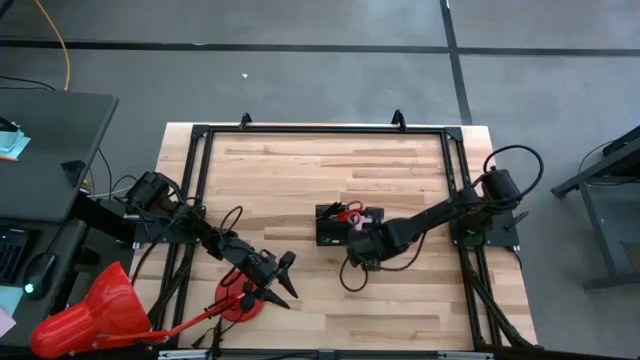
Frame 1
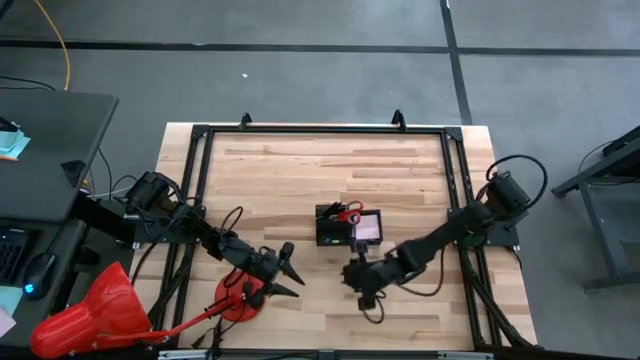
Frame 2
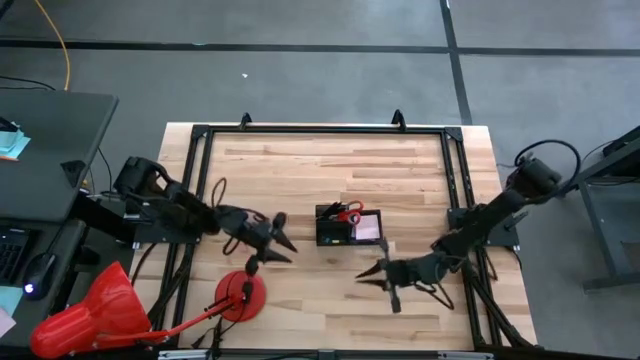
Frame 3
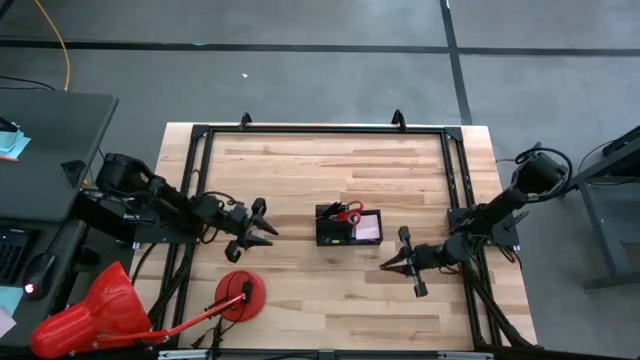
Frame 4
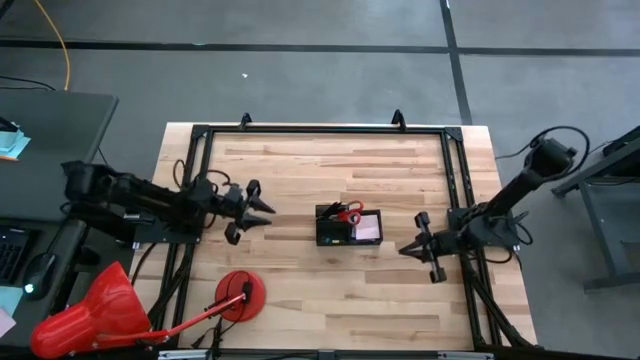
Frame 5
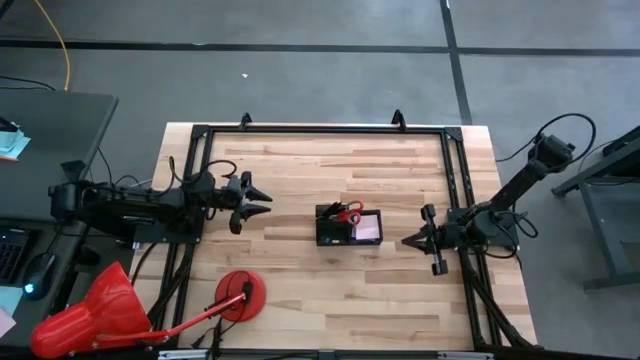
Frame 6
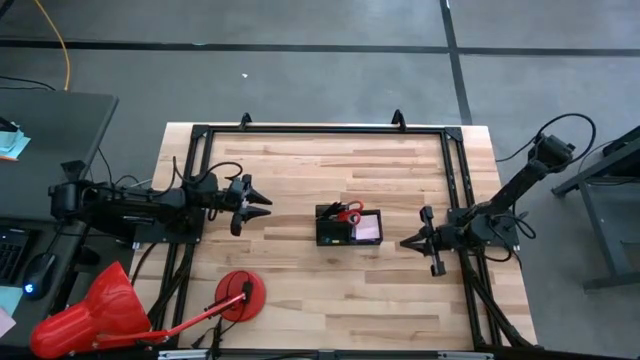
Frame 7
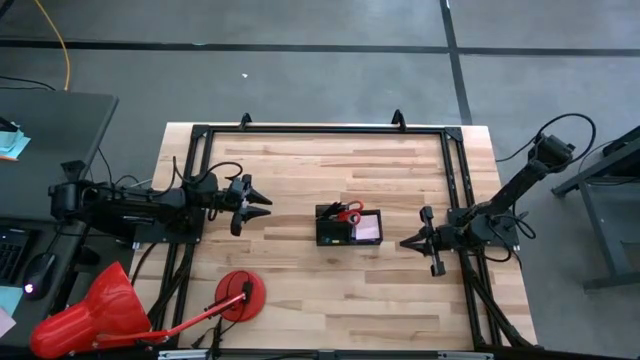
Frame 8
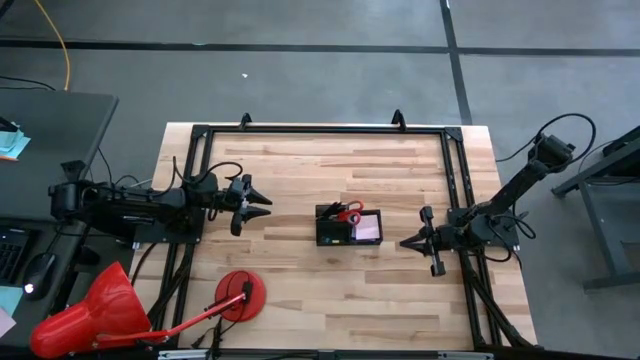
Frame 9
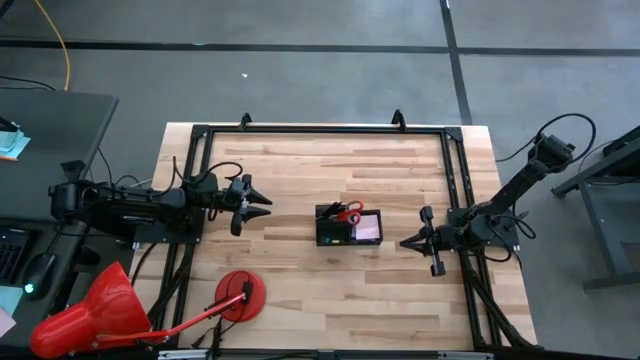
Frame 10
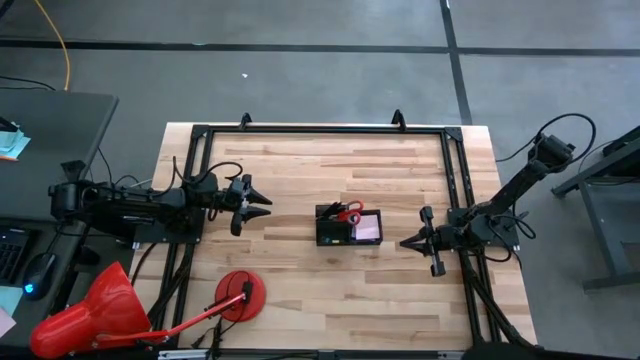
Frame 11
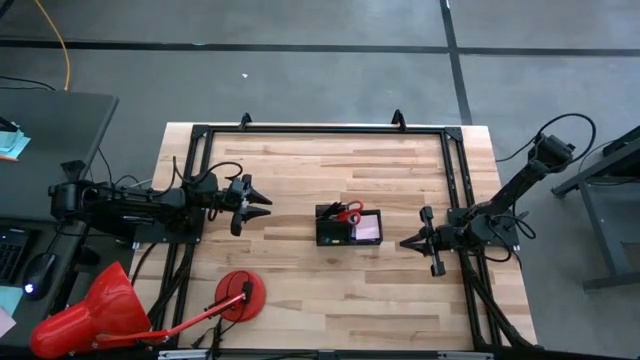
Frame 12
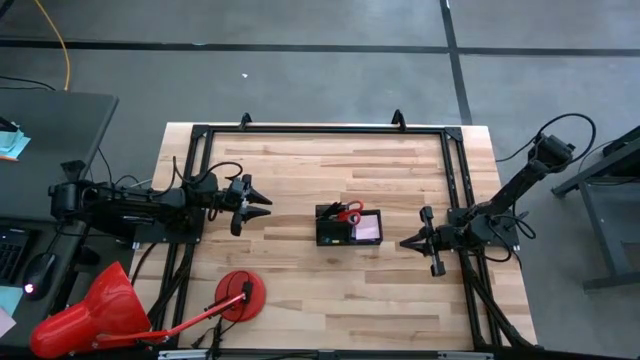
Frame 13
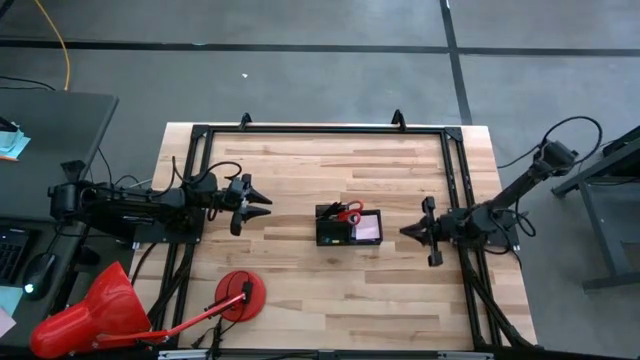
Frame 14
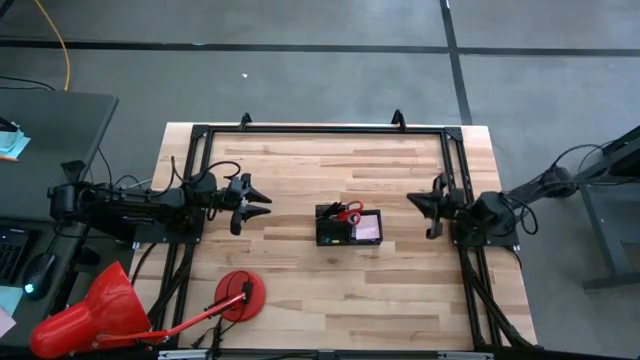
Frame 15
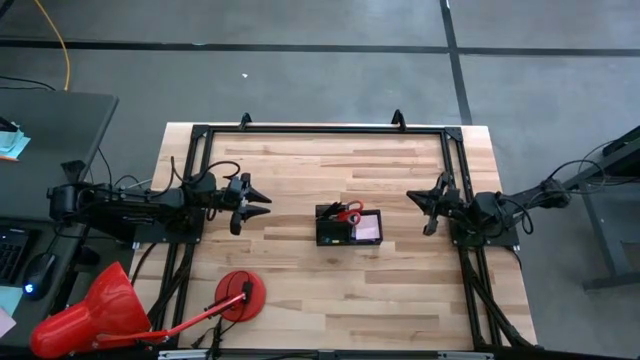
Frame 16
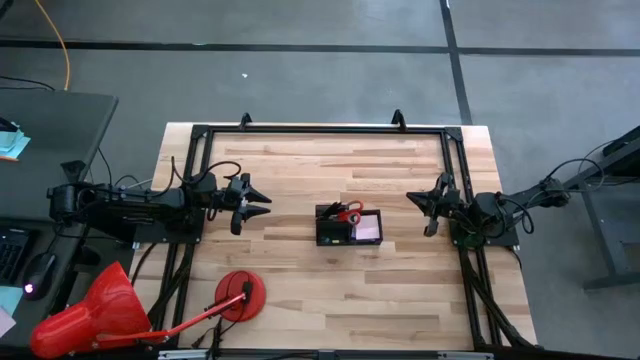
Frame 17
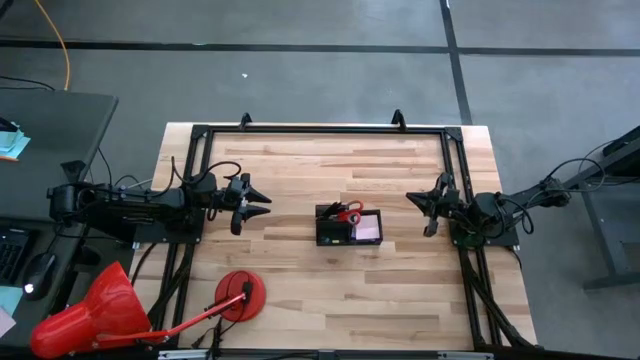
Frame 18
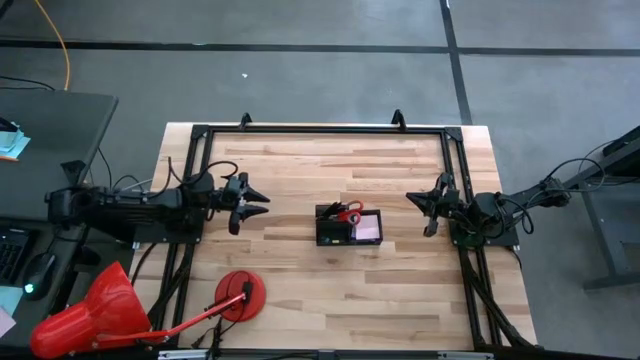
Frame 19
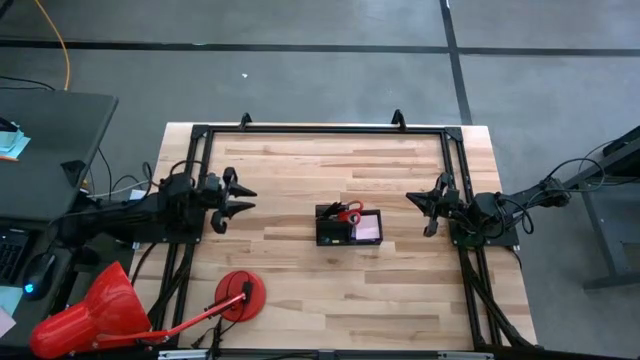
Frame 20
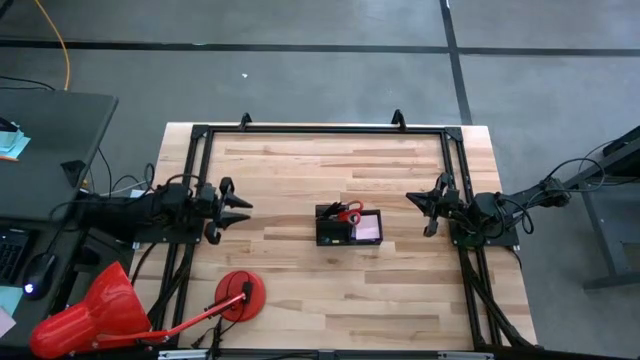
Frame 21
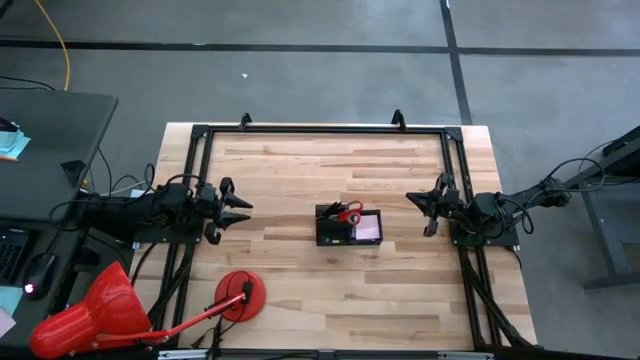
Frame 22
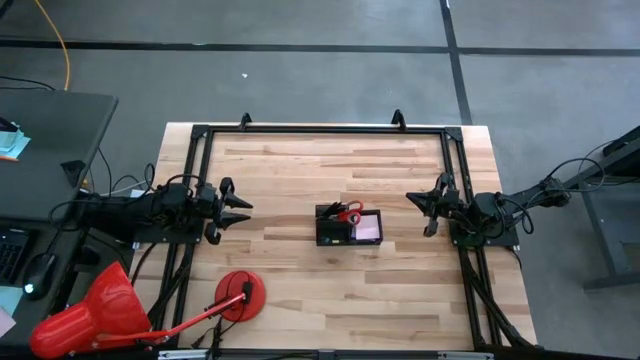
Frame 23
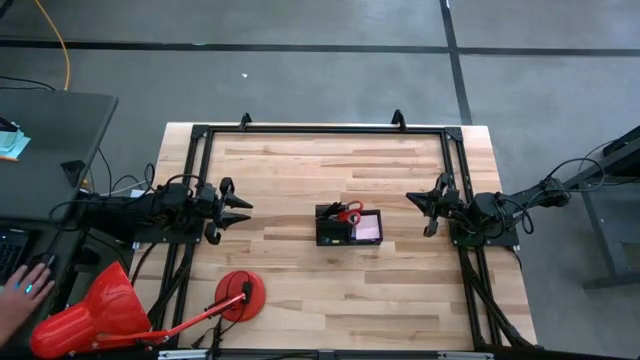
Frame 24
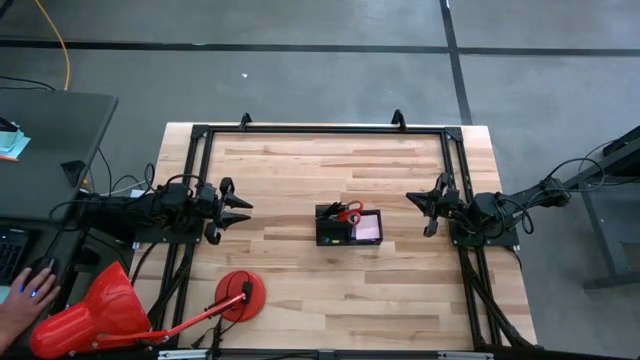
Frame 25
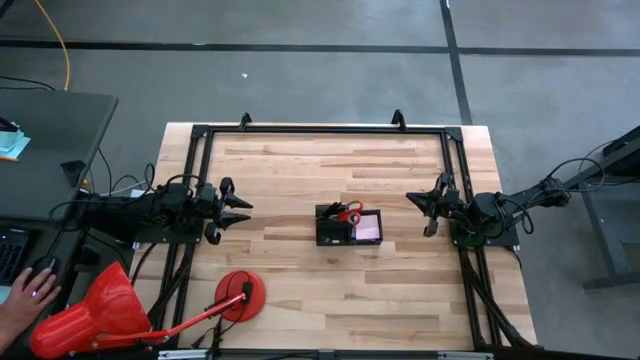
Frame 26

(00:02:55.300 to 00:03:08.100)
Task: Pick and place office supplies into organizer
Return to Home Position

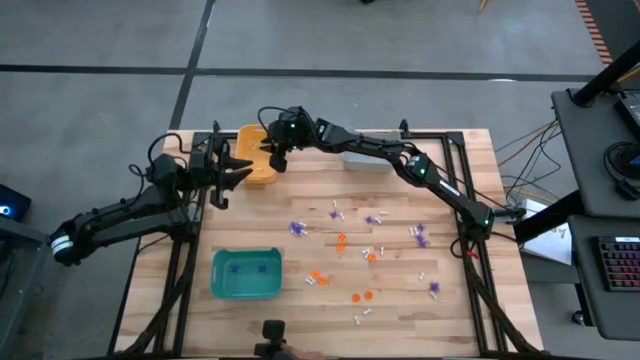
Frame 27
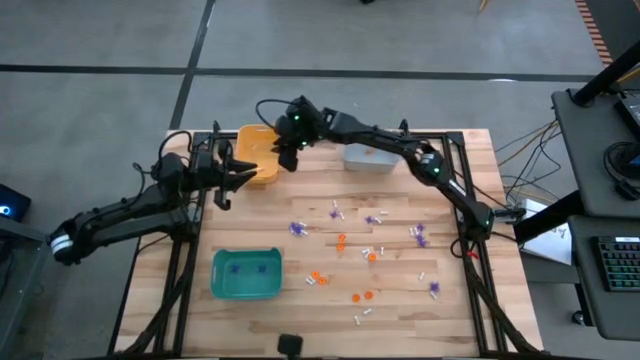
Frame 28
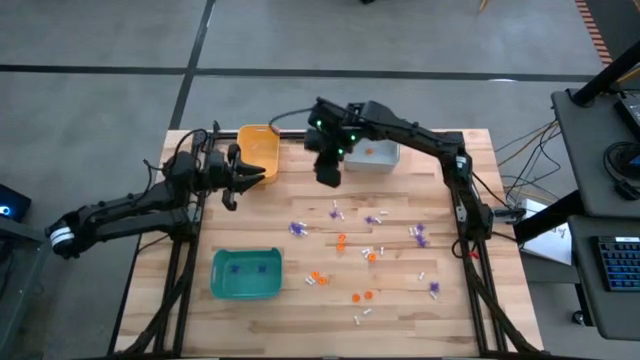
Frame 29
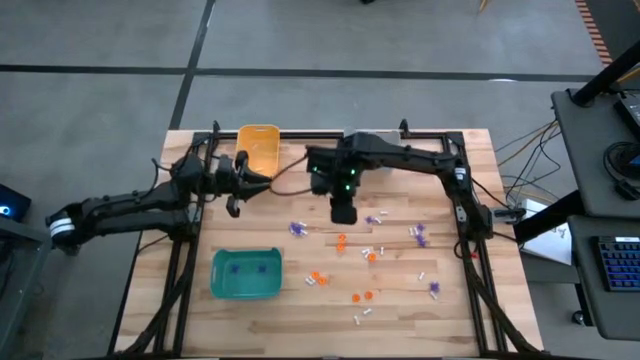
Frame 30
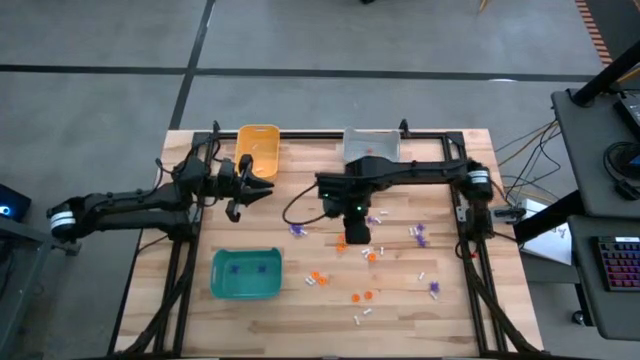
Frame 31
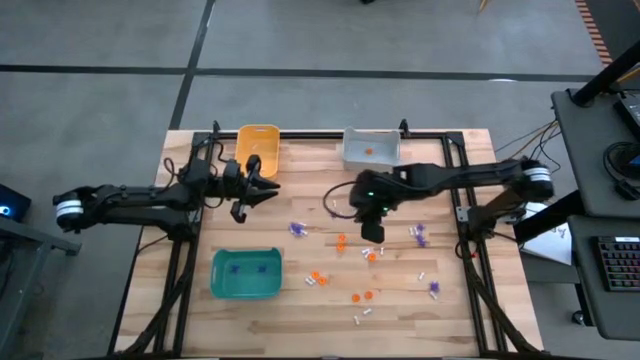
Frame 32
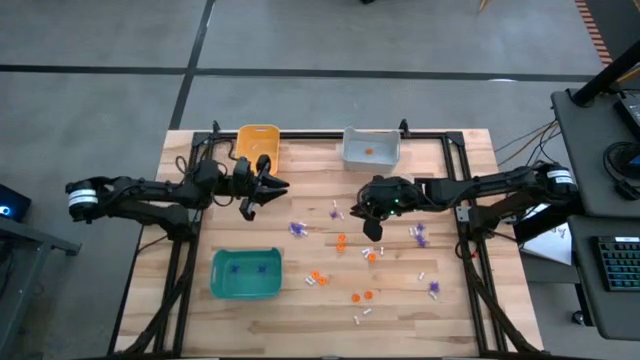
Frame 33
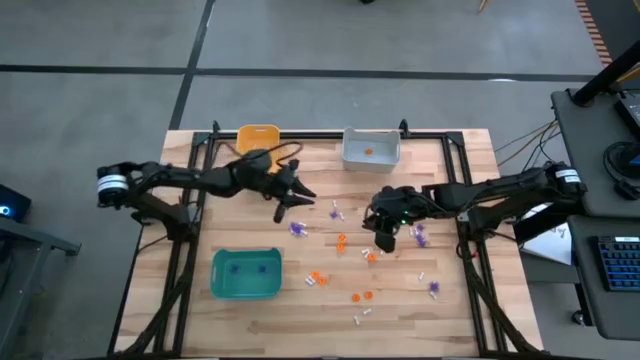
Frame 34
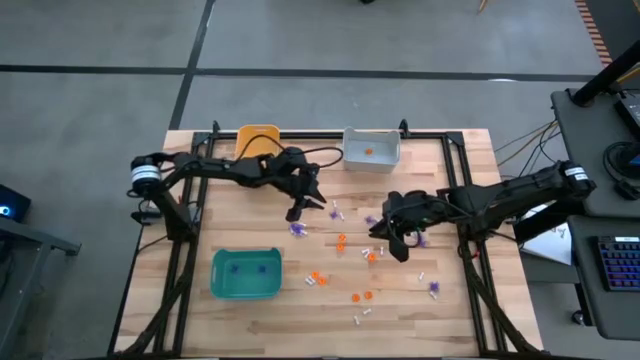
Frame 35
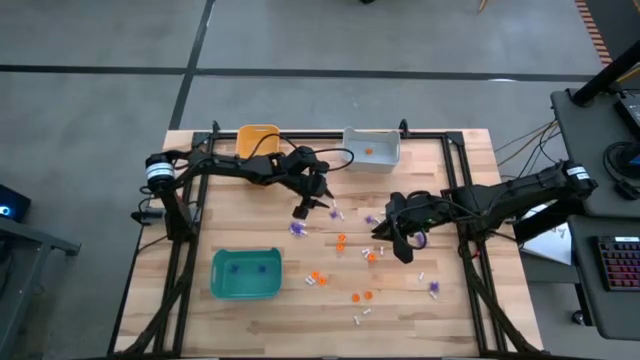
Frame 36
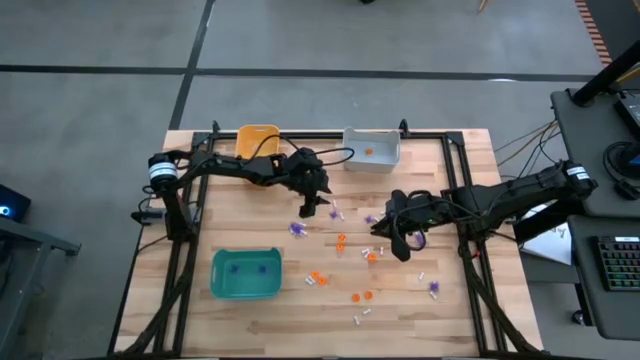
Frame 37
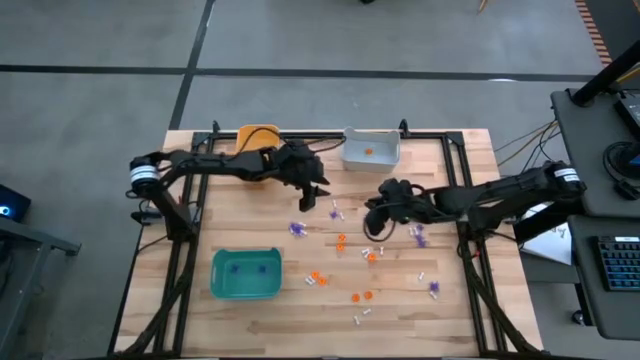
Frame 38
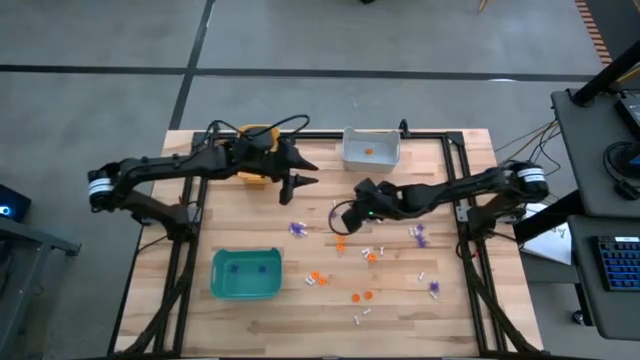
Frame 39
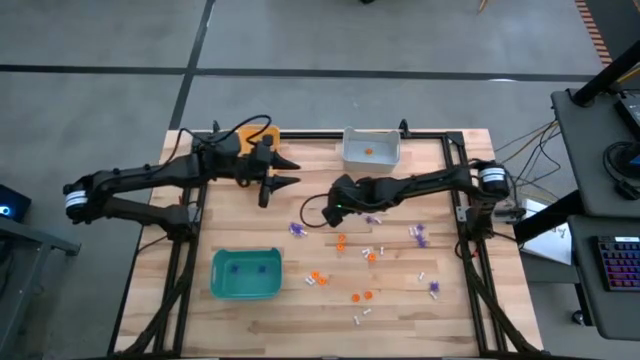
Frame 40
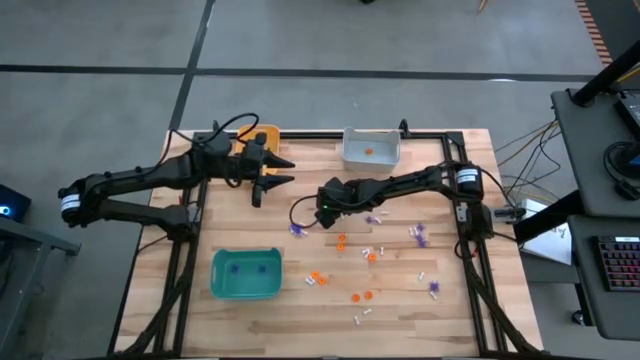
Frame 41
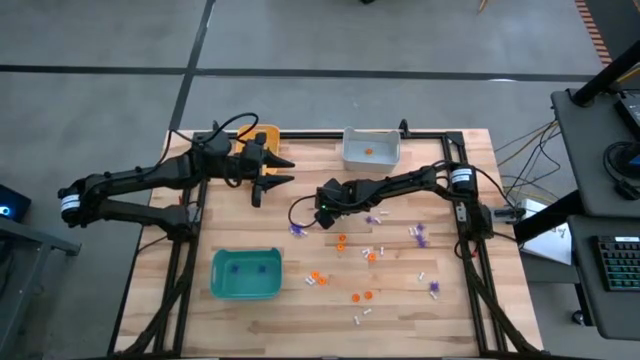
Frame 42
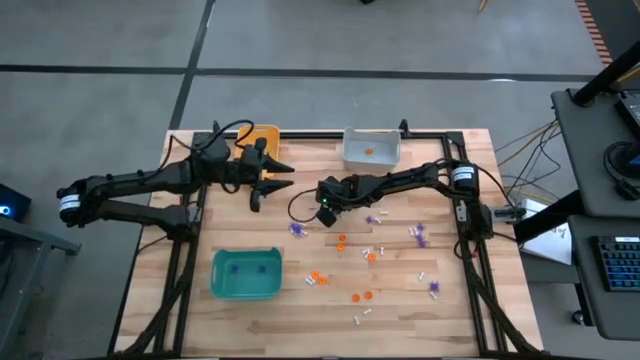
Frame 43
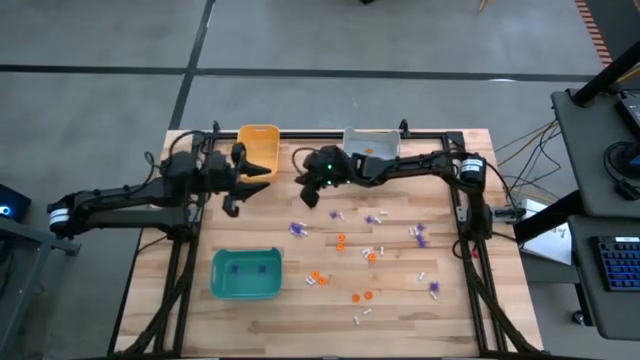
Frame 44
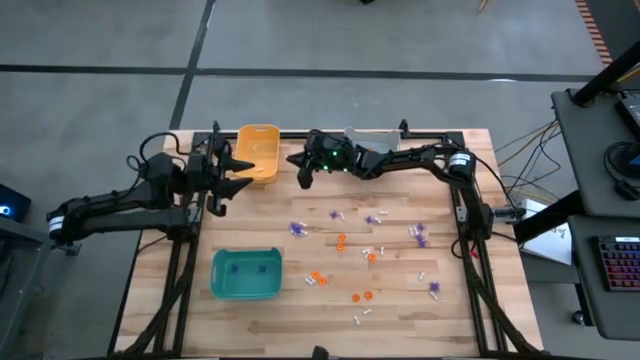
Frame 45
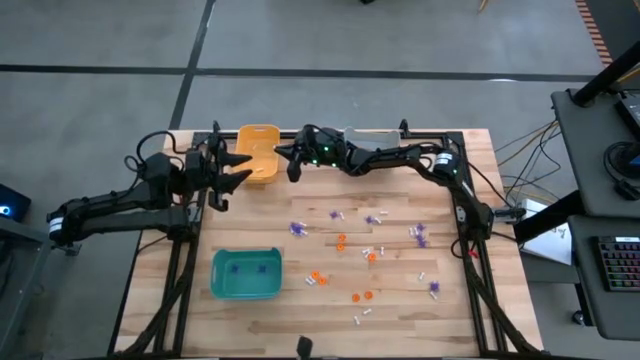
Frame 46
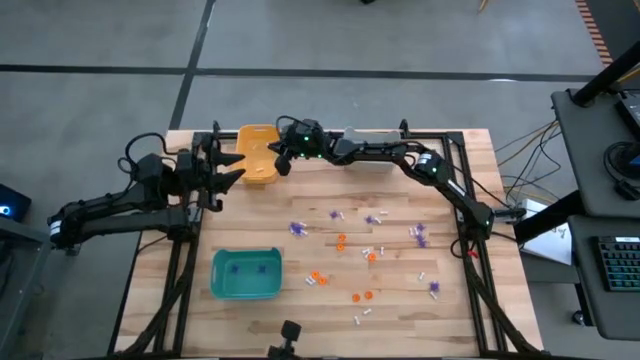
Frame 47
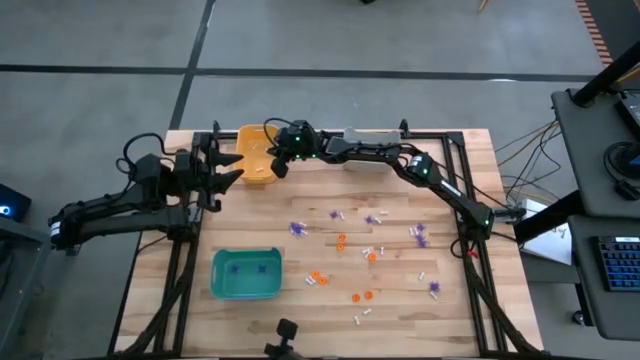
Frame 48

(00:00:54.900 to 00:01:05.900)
Task: Sort Halloween decoration
Put the white bone toy into the orange bin
